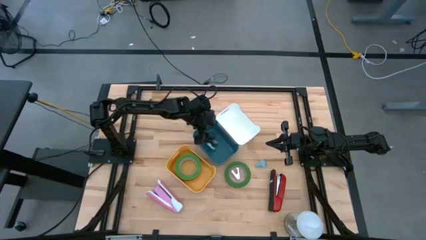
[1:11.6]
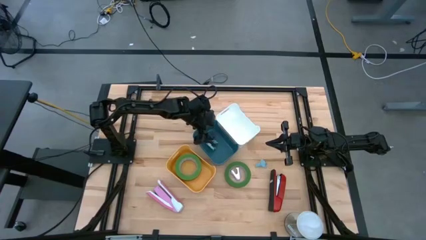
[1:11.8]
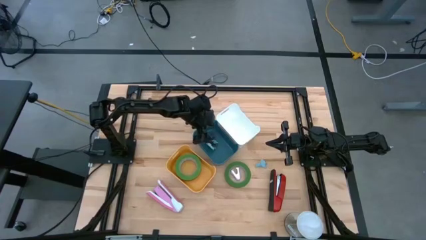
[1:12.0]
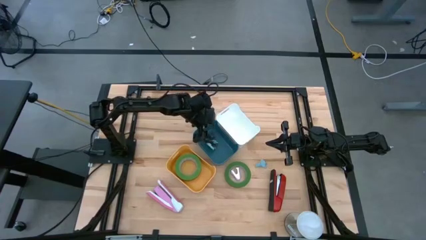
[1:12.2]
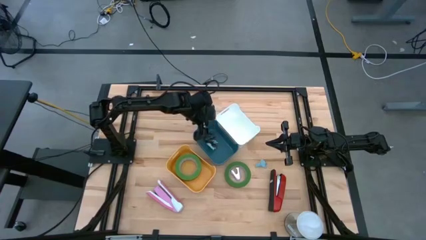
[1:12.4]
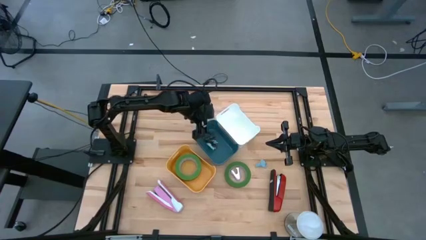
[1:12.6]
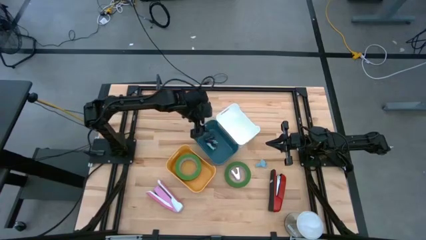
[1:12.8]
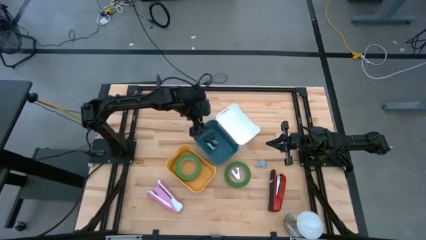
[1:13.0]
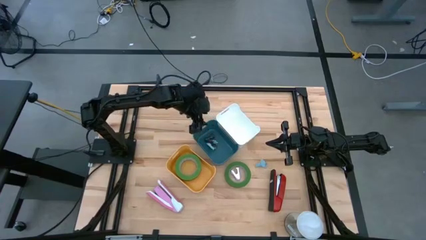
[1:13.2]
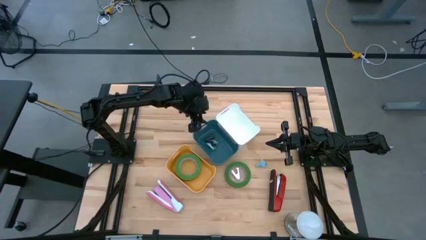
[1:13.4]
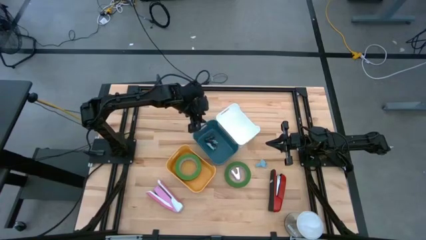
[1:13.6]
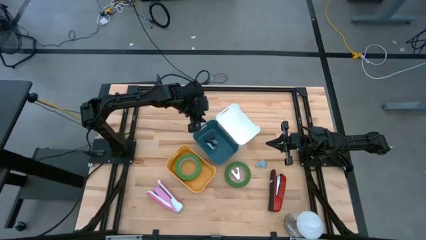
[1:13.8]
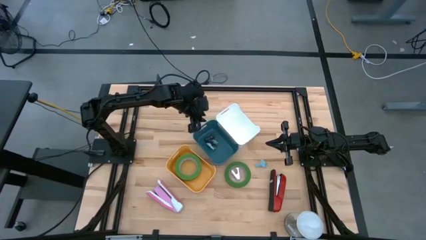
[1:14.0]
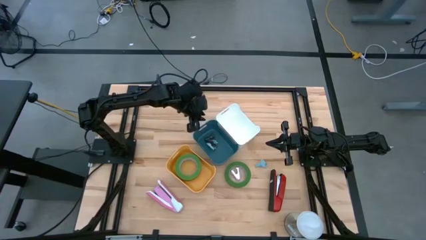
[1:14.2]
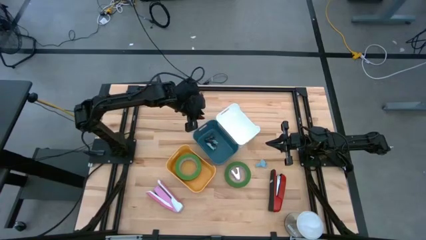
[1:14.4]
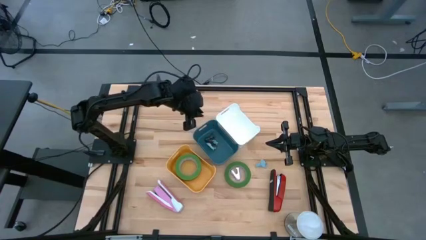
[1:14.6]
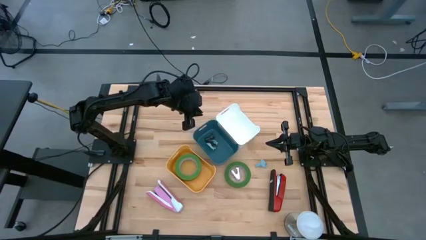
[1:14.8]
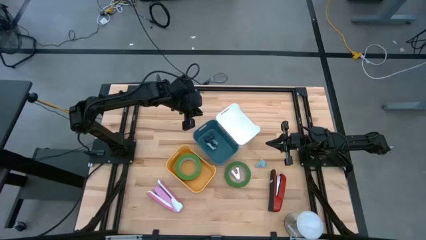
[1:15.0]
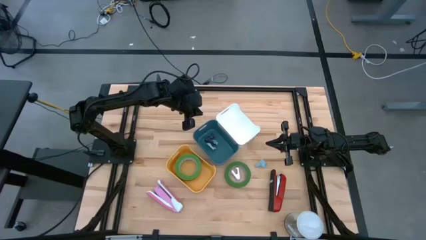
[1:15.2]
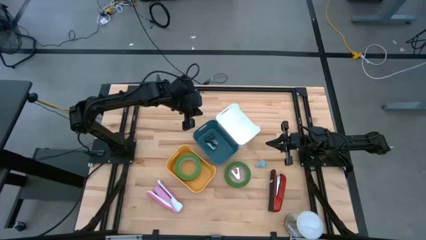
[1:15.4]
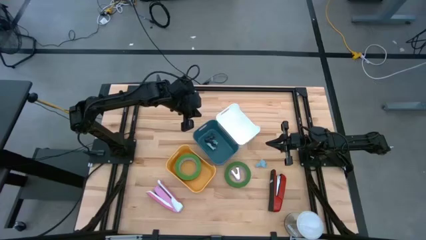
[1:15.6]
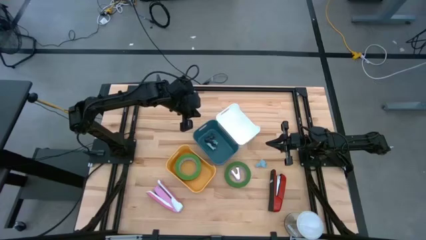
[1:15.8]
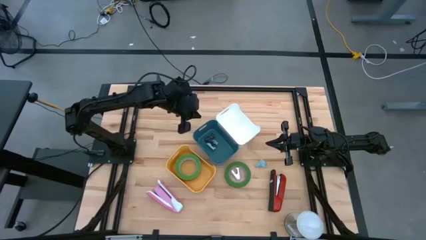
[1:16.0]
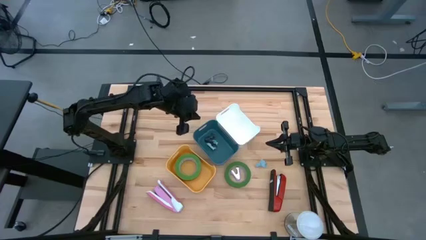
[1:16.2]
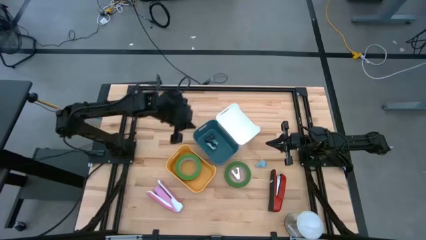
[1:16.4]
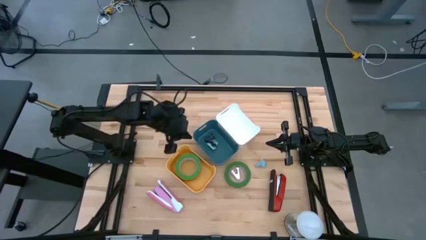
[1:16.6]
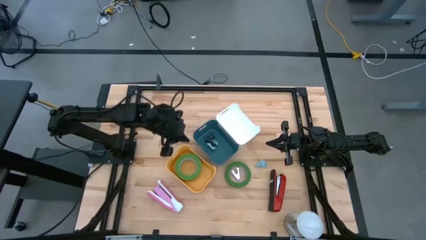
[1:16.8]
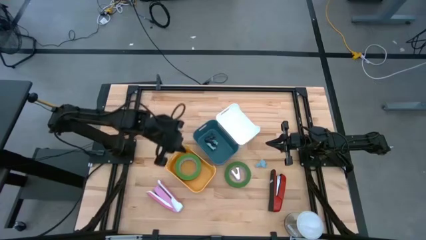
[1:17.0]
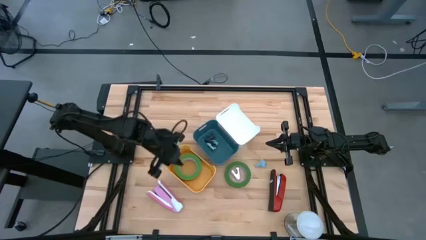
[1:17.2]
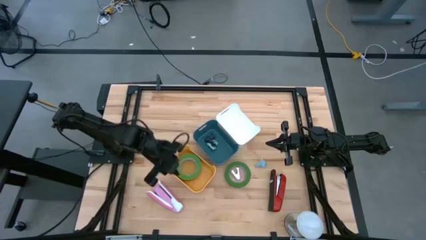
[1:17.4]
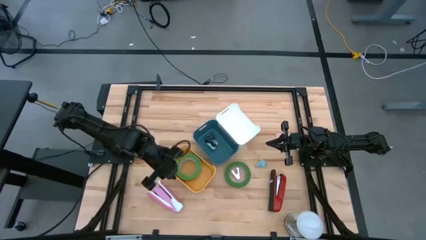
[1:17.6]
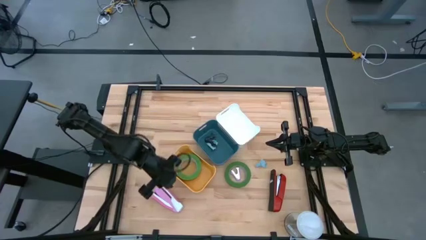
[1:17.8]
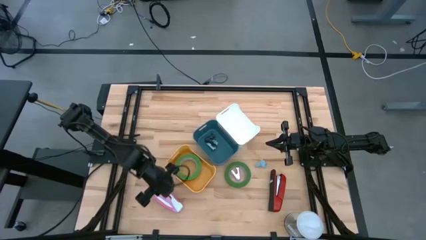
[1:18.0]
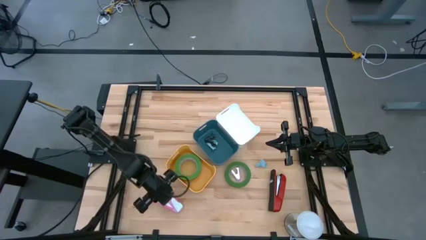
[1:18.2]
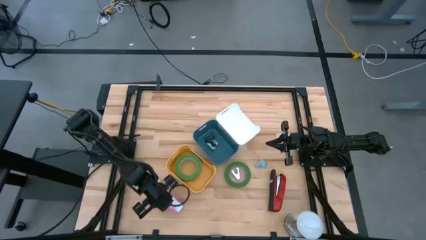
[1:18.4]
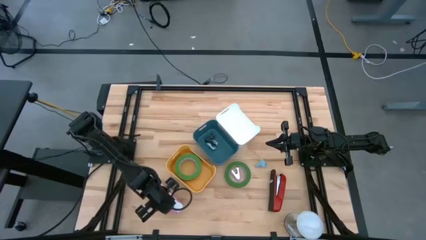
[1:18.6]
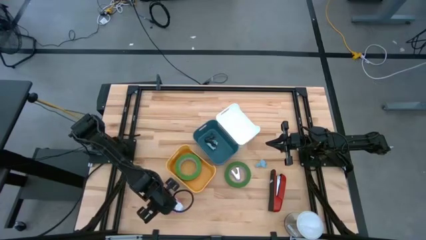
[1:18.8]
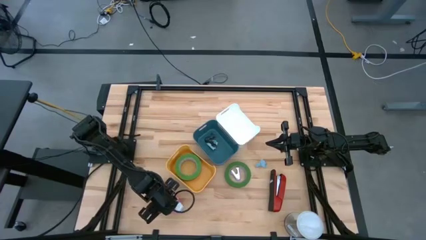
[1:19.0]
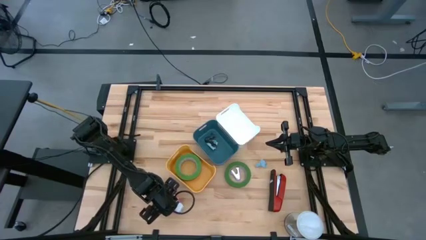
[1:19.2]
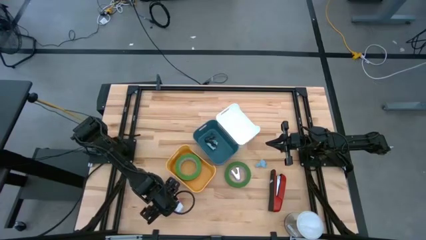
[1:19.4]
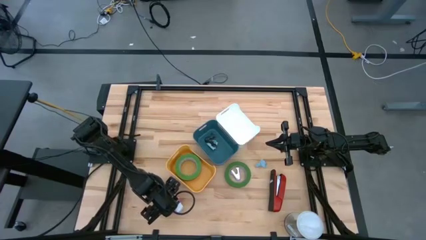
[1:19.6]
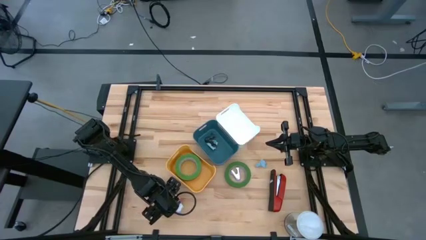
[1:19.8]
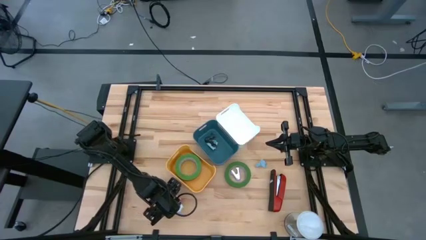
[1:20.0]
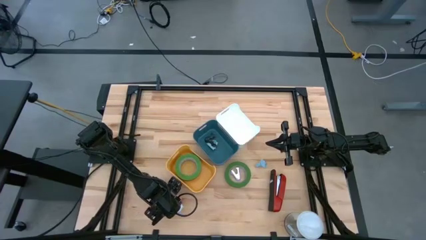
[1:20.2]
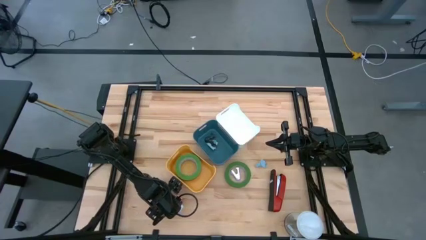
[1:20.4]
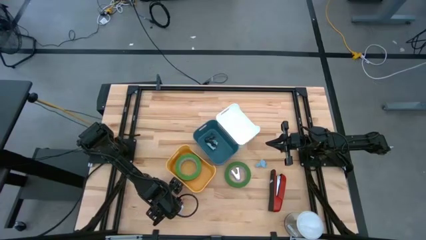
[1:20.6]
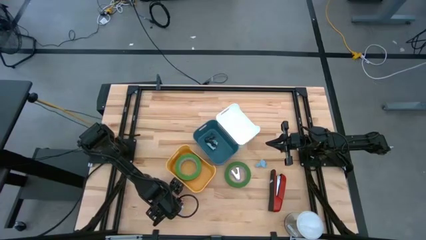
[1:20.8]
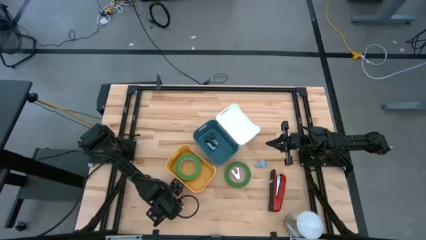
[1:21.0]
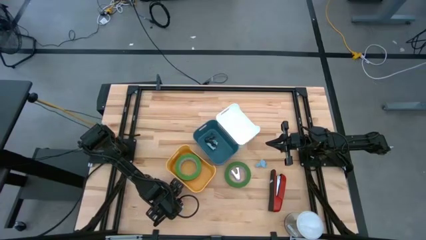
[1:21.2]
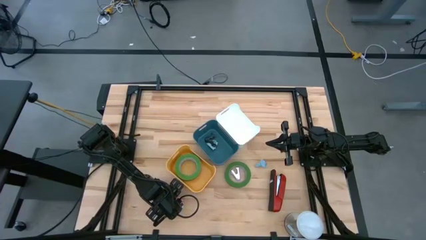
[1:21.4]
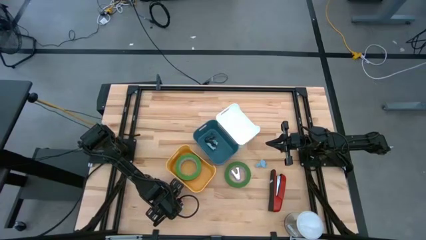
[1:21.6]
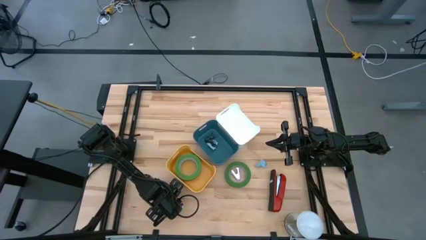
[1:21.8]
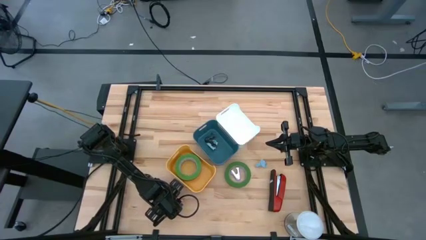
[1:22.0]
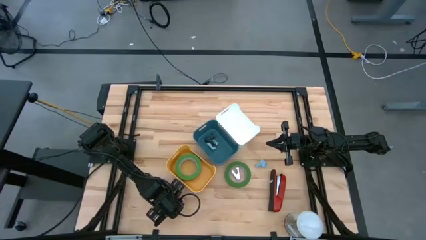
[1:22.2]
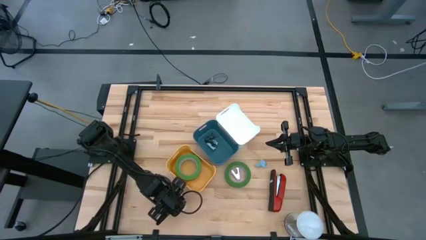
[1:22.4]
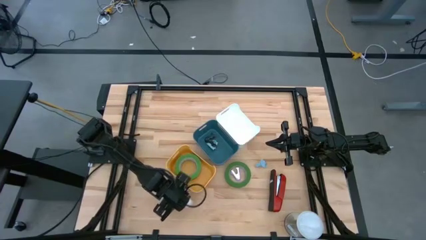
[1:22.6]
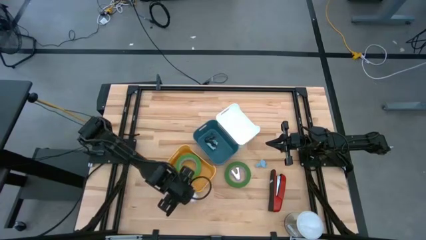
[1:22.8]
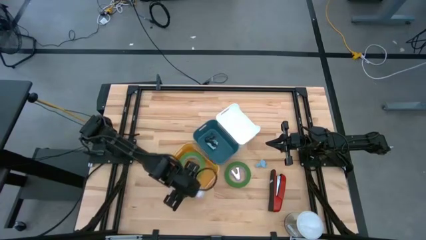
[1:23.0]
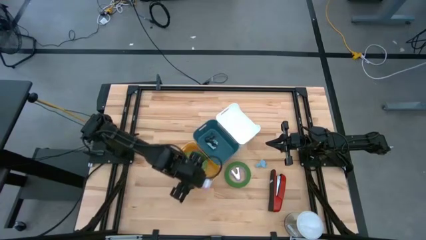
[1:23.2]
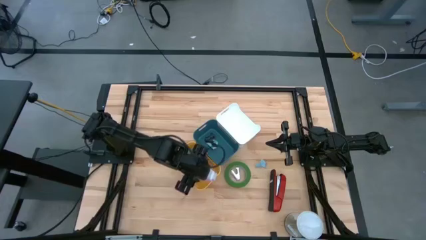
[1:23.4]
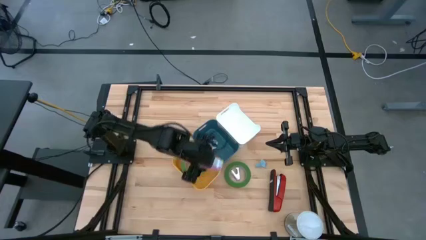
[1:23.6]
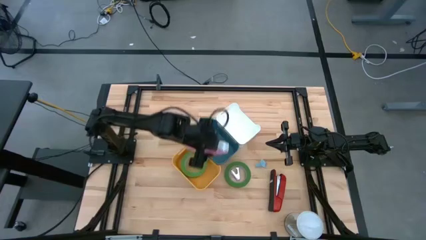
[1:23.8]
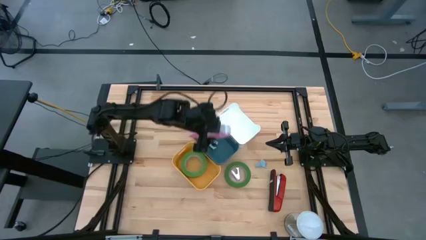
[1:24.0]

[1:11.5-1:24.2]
Task: Pick and place Stapler, Stapler remover, tape
Put the pink stapler into the white bin

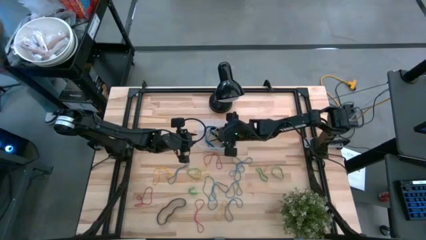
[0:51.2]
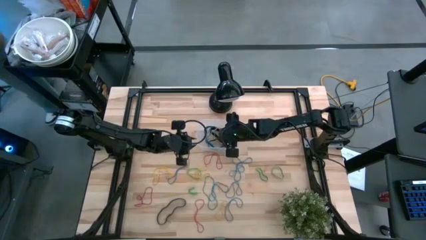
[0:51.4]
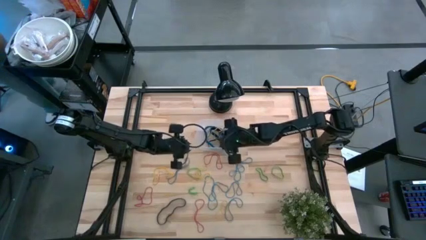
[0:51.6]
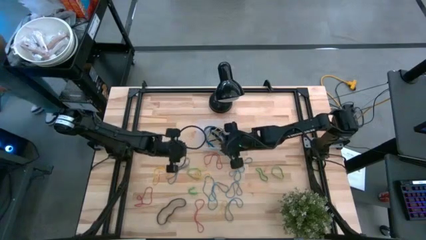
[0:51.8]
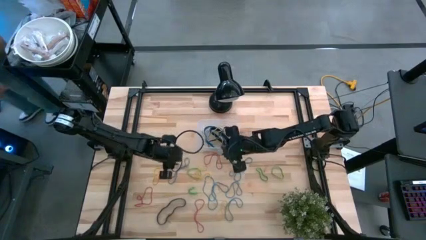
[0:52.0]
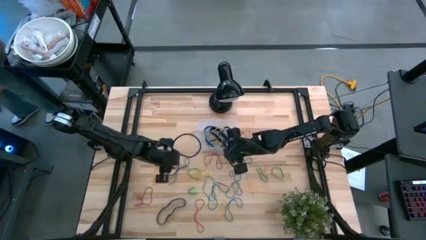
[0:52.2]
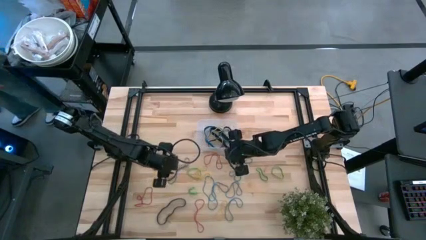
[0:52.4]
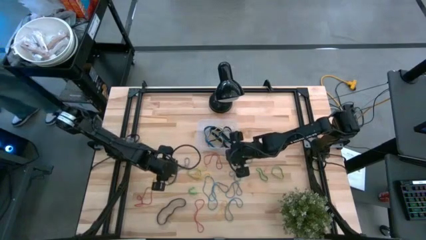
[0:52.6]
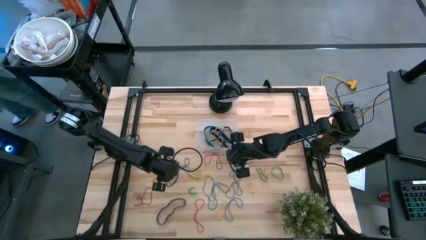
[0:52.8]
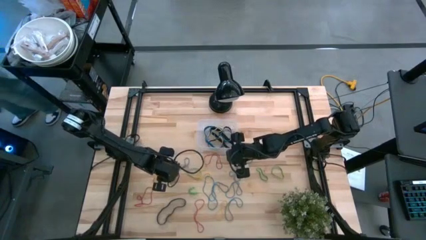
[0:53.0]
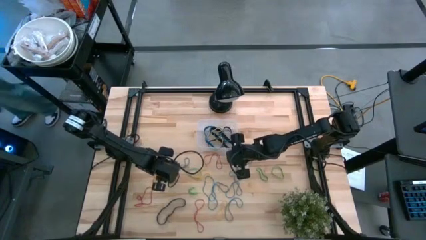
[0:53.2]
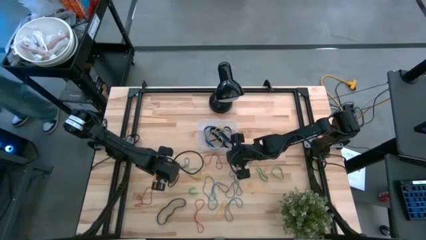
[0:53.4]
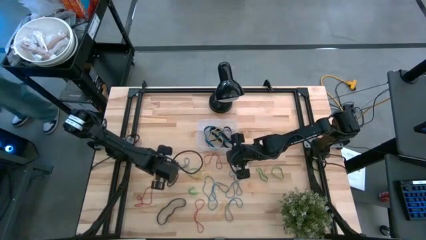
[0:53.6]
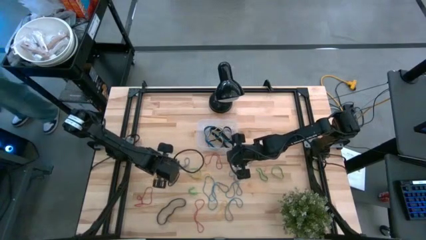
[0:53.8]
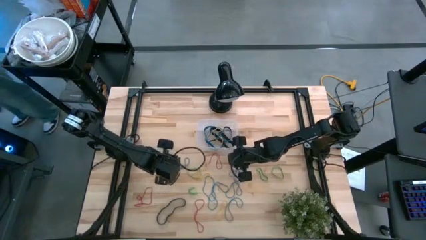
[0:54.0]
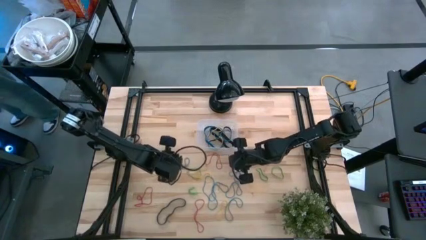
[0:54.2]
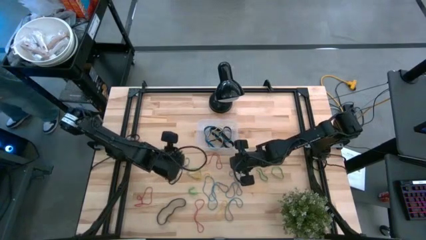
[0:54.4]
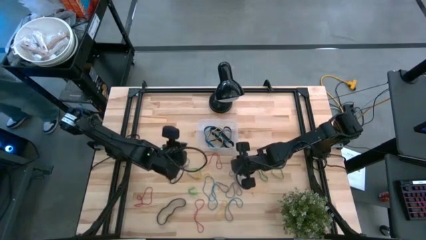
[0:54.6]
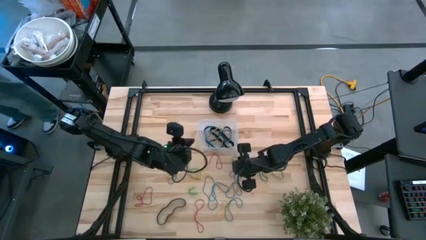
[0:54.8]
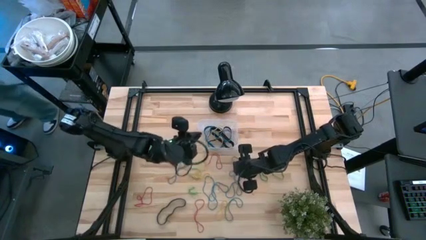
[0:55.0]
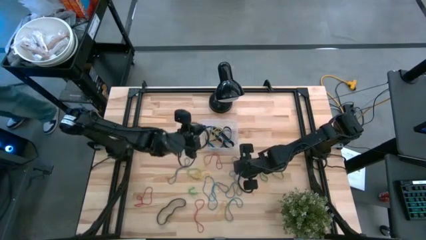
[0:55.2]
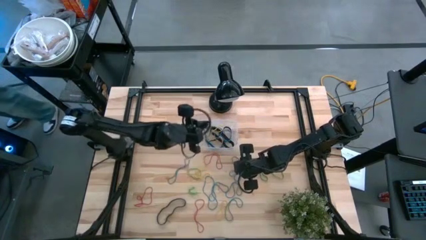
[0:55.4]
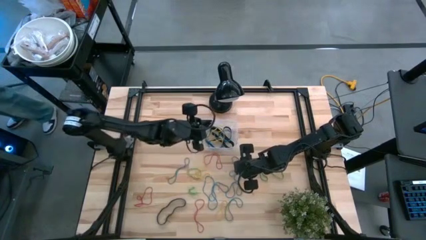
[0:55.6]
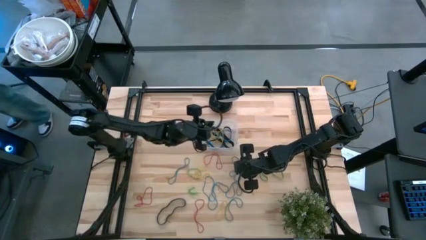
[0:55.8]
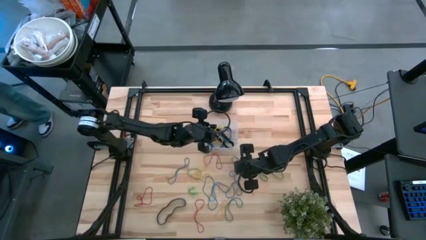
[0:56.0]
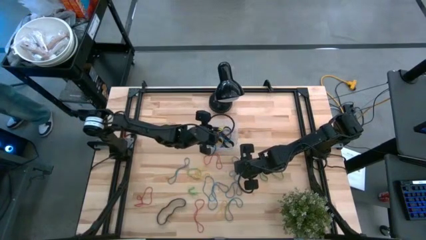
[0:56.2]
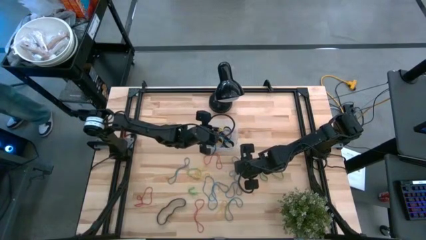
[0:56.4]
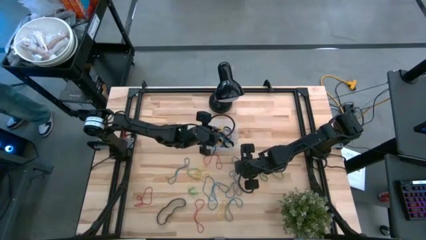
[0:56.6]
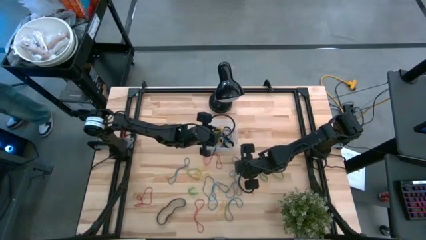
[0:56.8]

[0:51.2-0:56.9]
Task: Pick and place rubber bands into bin
Put the yellow rubber band into the transparent bin
